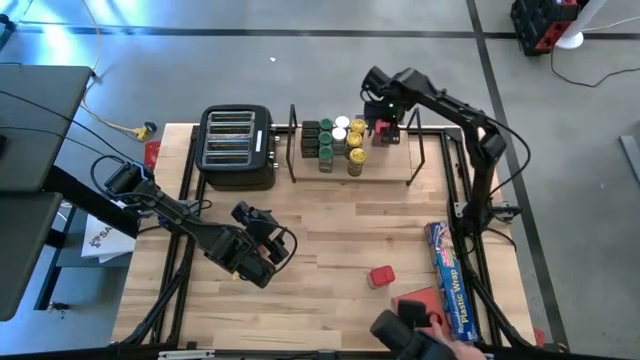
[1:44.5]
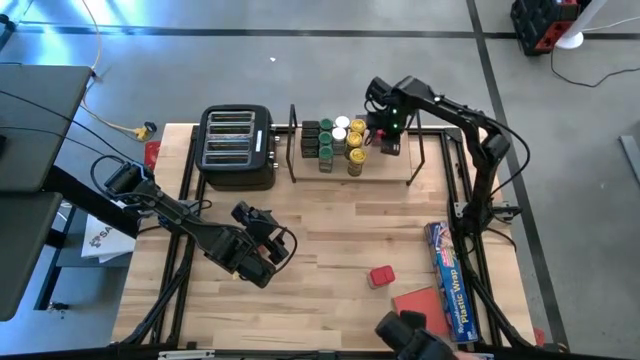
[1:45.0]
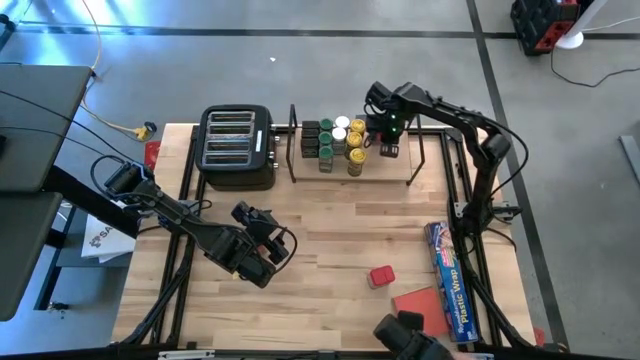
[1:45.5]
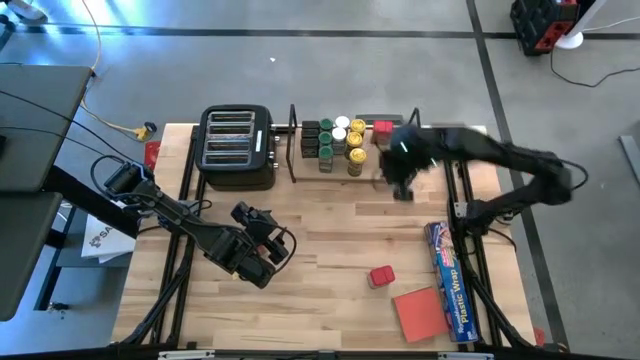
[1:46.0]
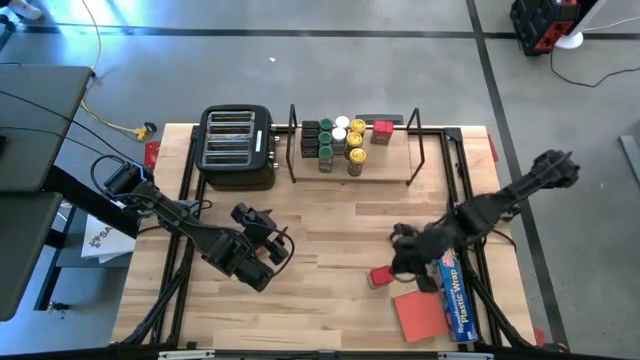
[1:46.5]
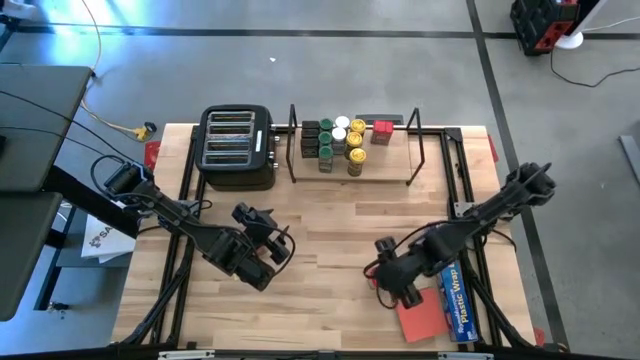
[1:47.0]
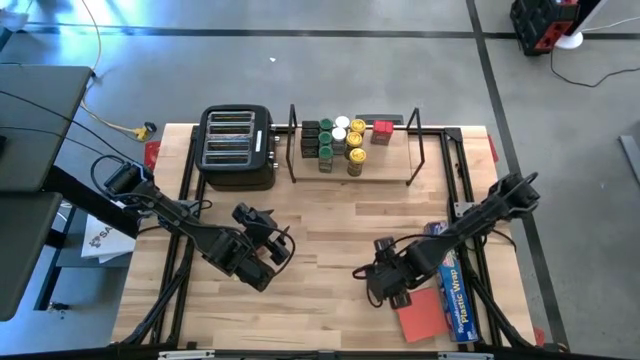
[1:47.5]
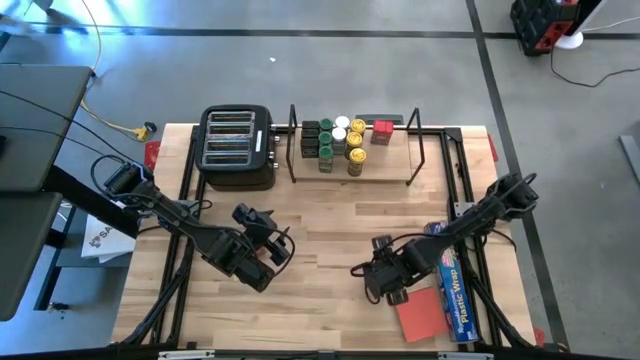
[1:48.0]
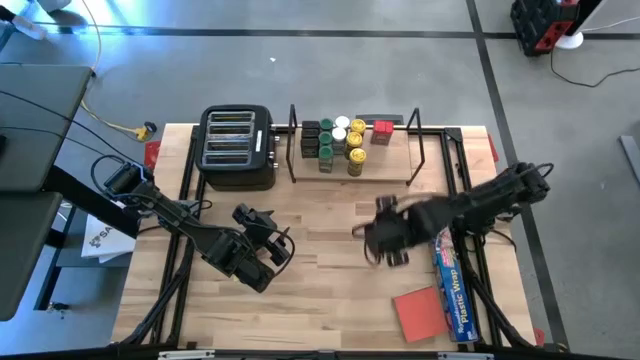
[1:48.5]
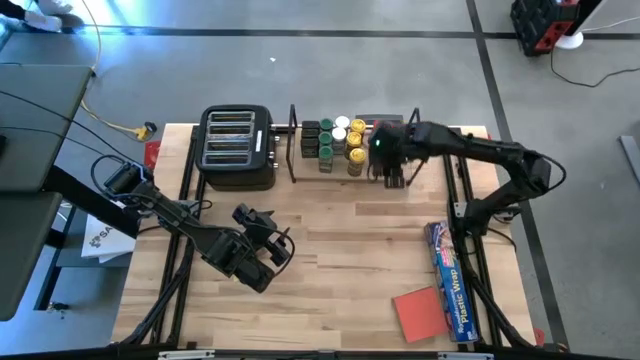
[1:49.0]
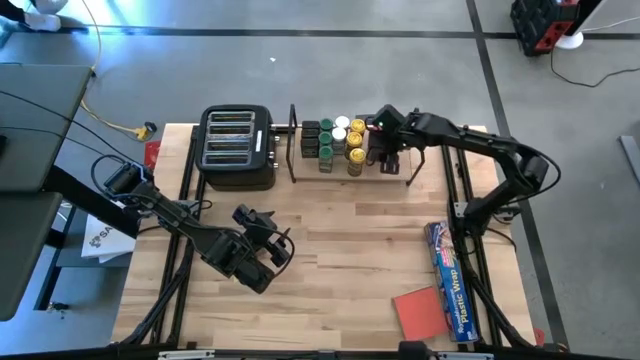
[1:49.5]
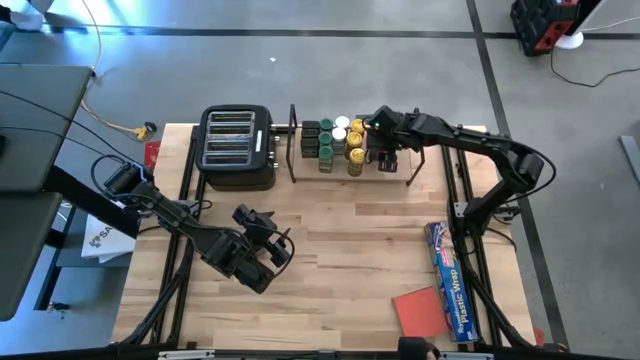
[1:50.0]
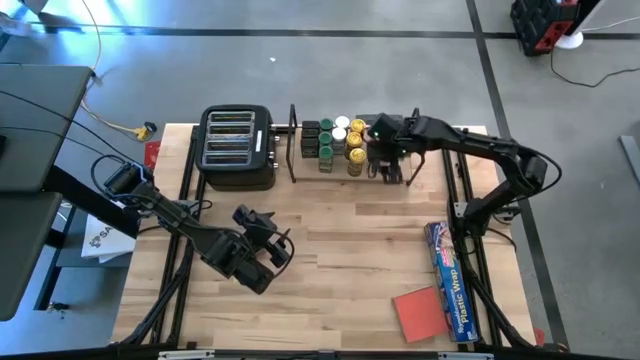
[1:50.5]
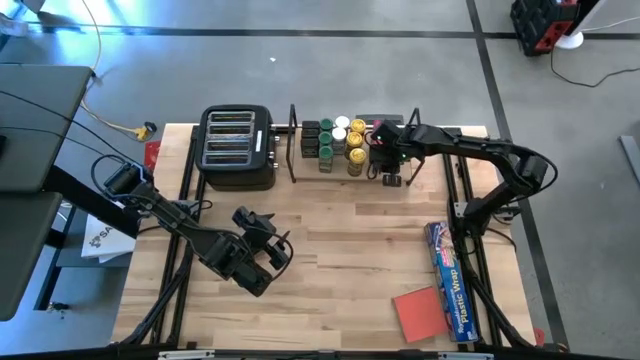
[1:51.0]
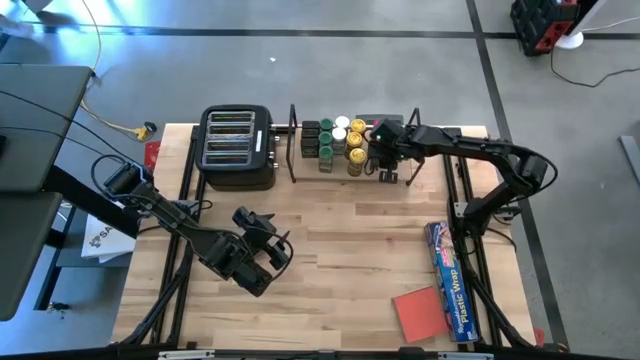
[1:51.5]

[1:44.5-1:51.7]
Task: Shelf spices
Put the right red seasoning can on the shelf aligned with the other red seasoning can

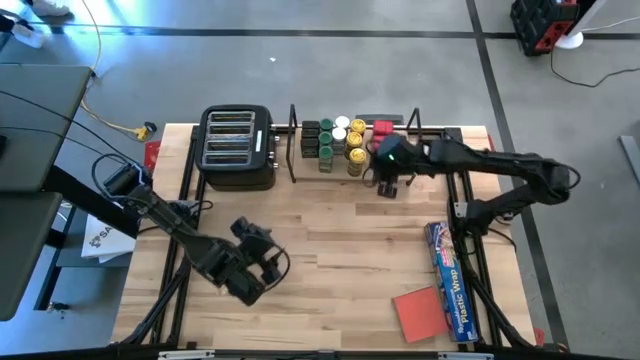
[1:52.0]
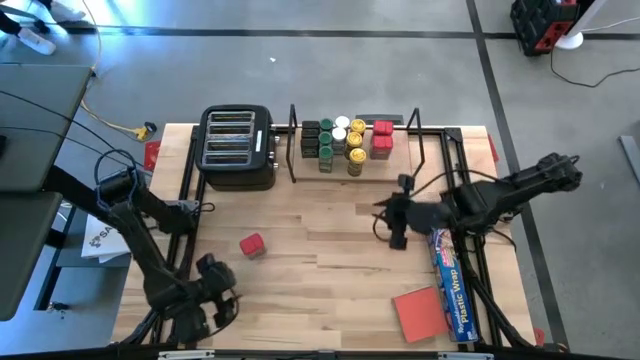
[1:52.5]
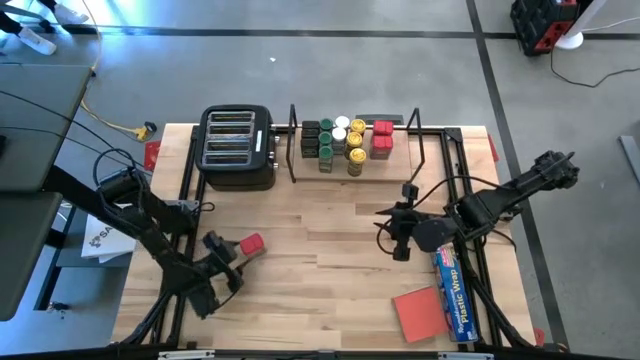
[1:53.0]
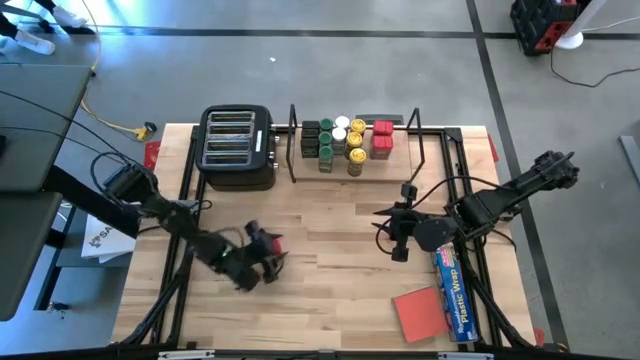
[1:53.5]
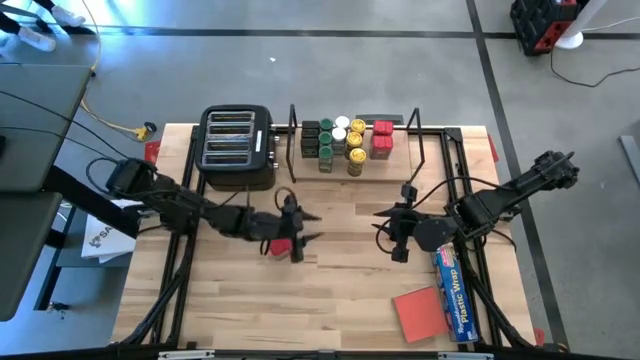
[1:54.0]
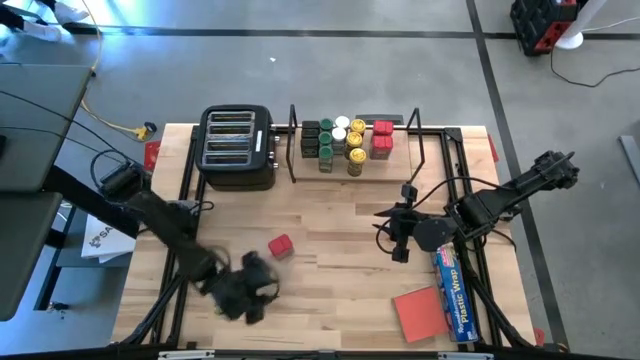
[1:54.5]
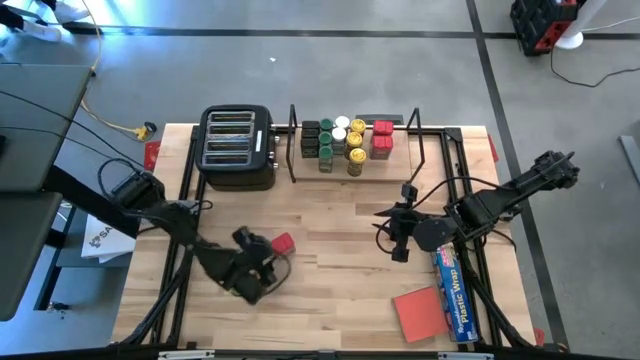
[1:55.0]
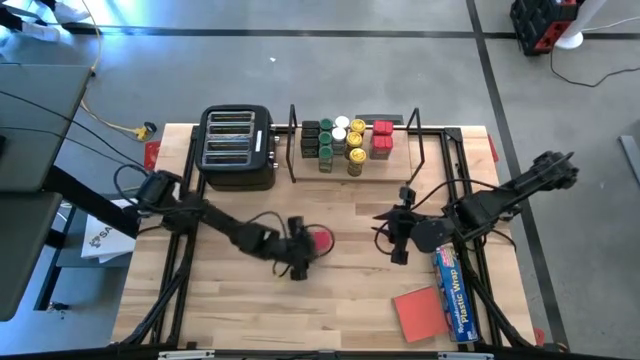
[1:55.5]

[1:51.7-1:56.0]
Put the red seasoning can on the shelf aligned with the other red seasoning cans

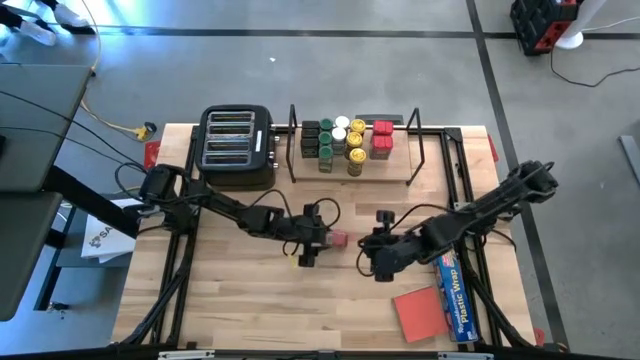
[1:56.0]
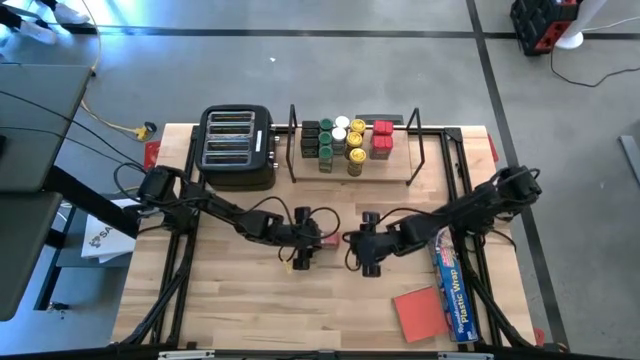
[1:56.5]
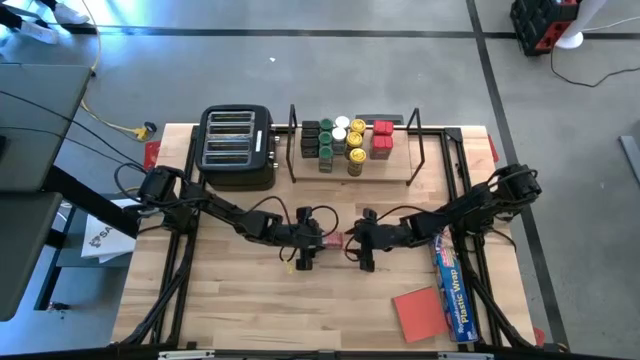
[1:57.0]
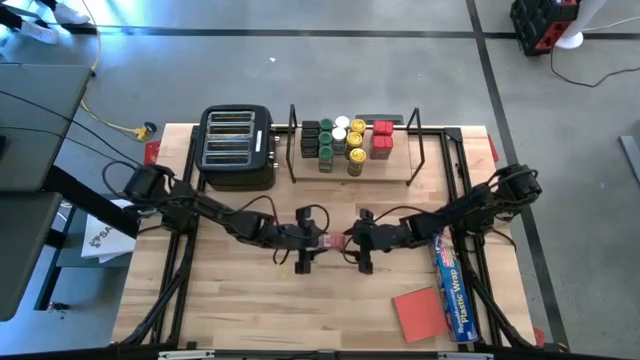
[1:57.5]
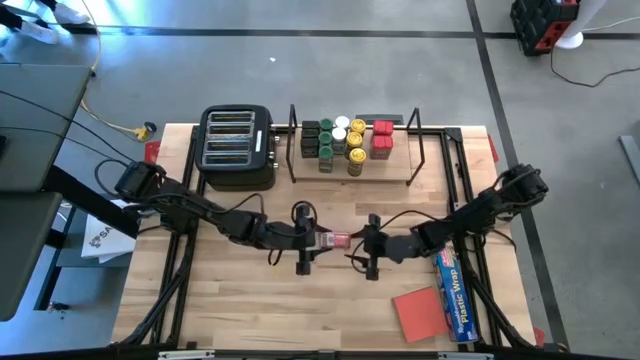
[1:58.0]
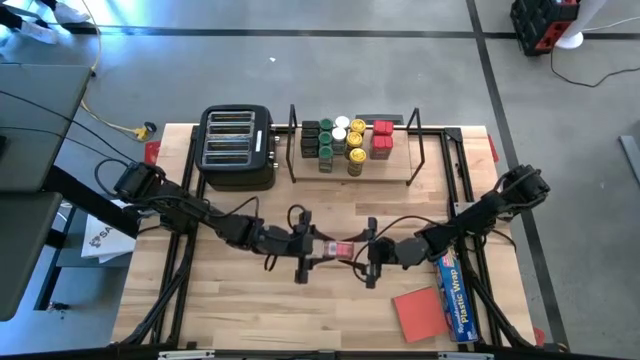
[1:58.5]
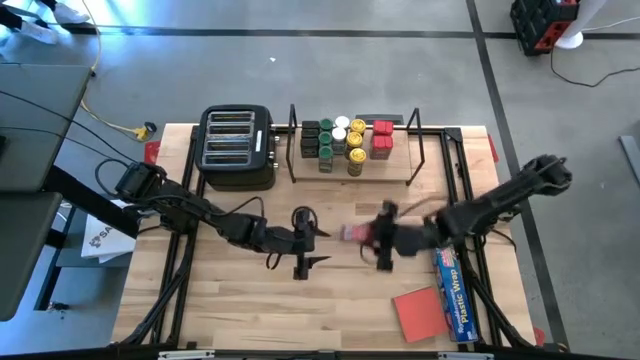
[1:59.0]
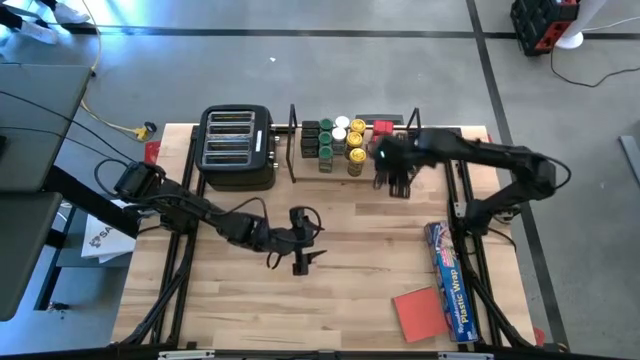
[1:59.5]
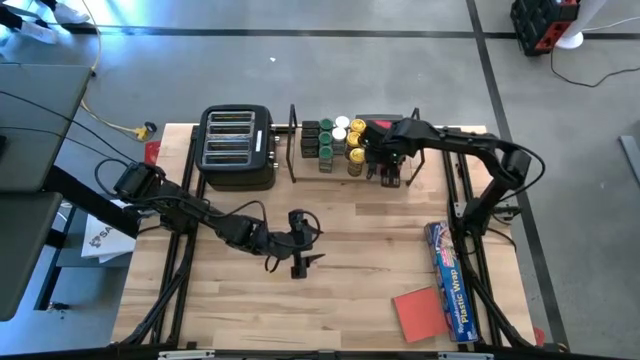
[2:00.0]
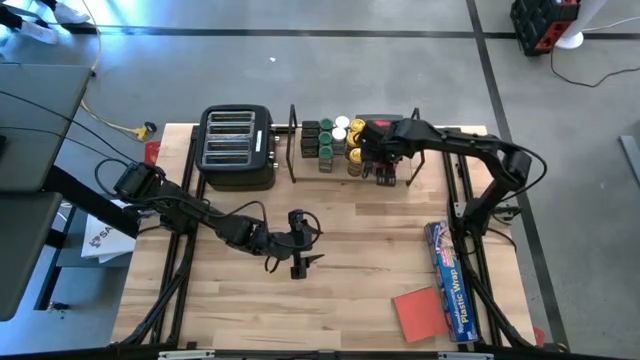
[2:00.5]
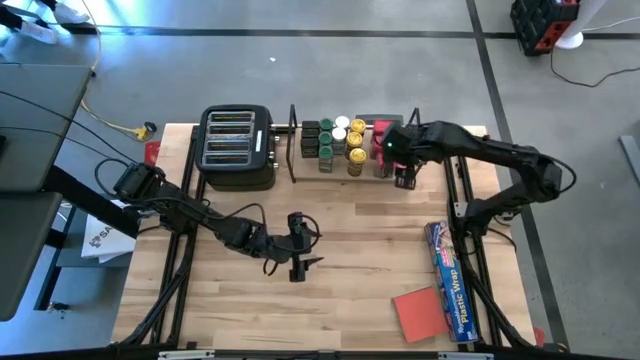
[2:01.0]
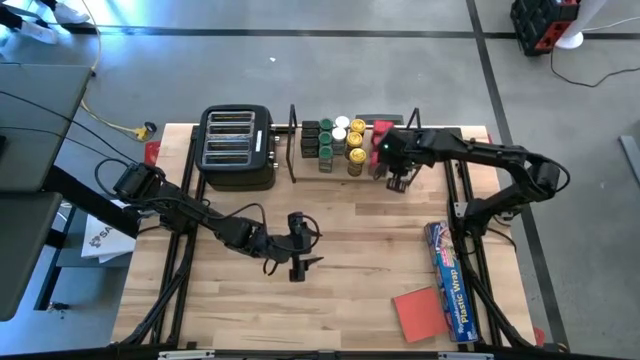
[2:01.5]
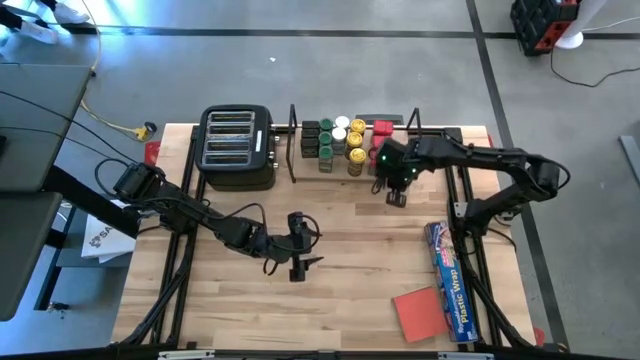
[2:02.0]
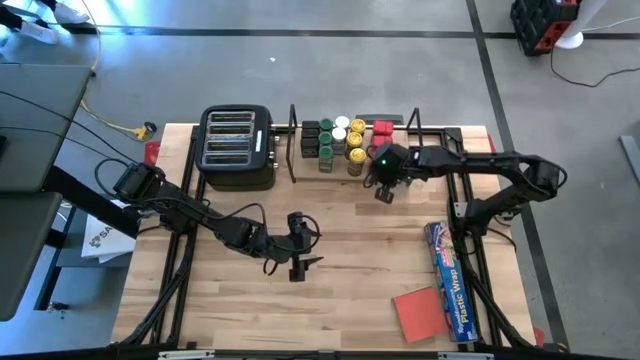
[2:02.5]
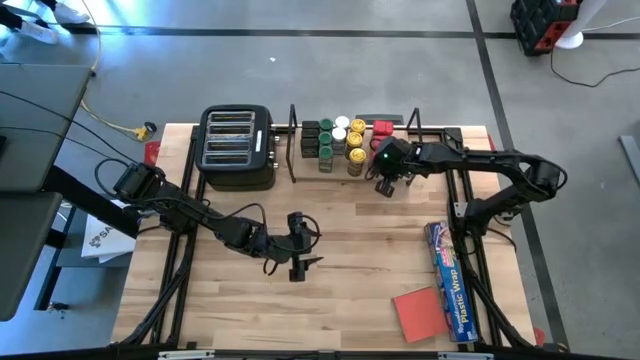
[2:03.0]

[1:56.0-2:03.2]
Put the red seasoning can on the shelf aligned with the other red seasoning cans

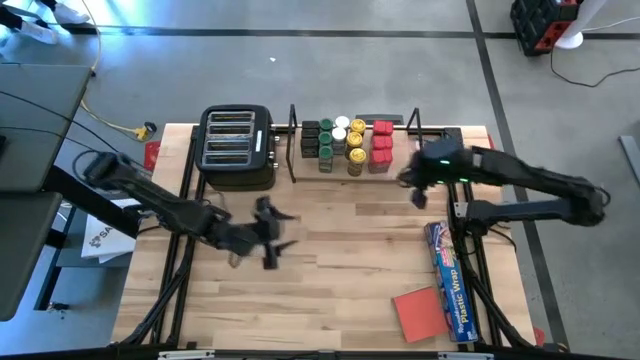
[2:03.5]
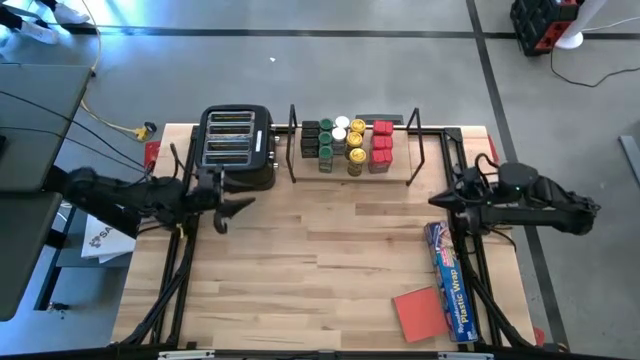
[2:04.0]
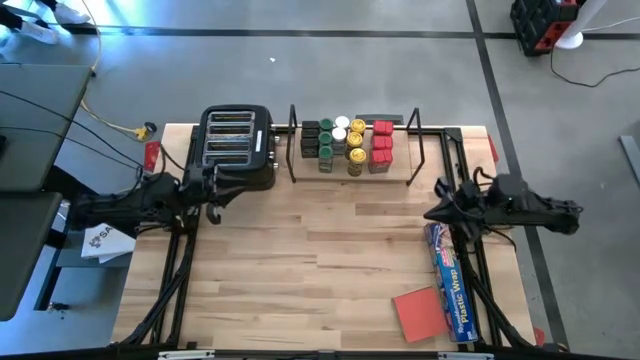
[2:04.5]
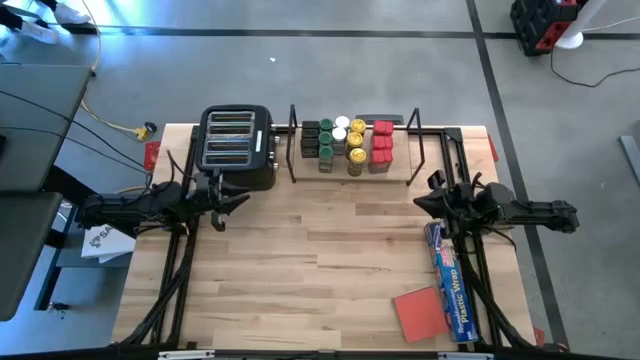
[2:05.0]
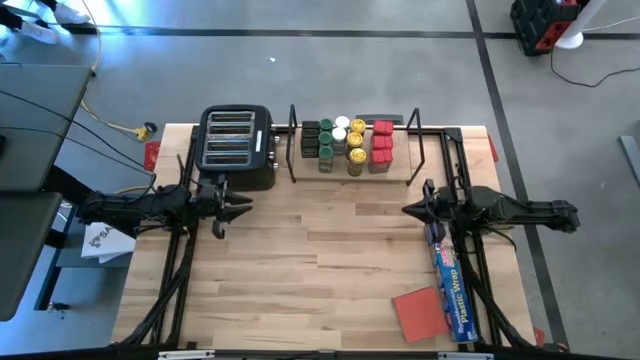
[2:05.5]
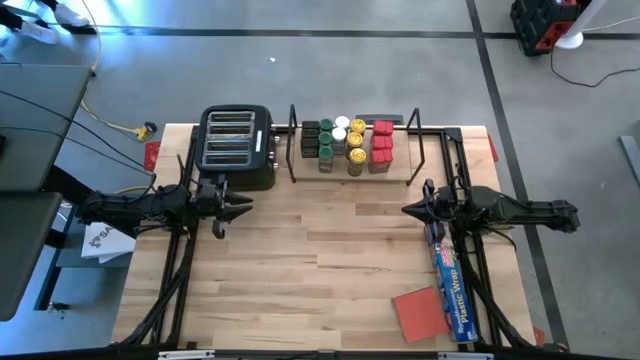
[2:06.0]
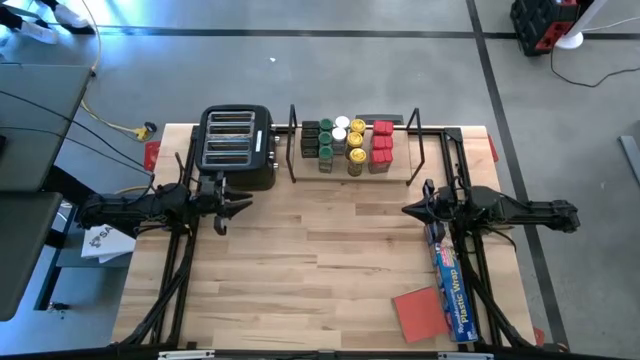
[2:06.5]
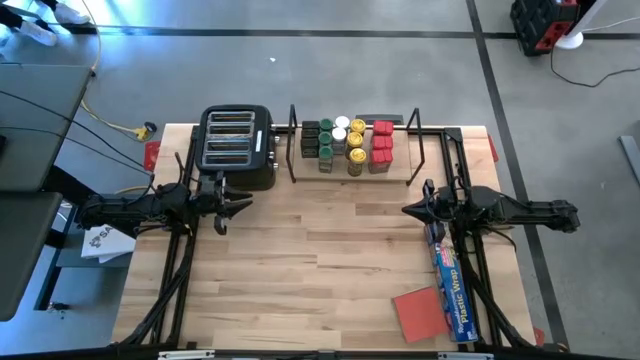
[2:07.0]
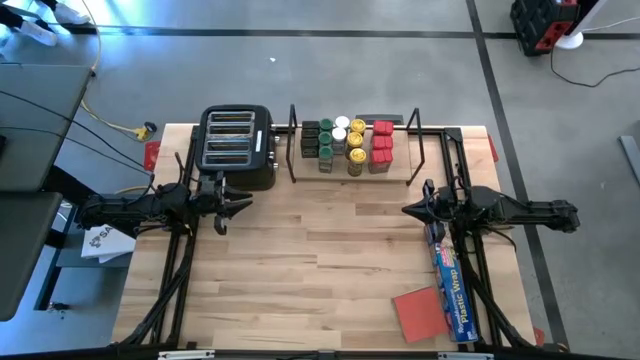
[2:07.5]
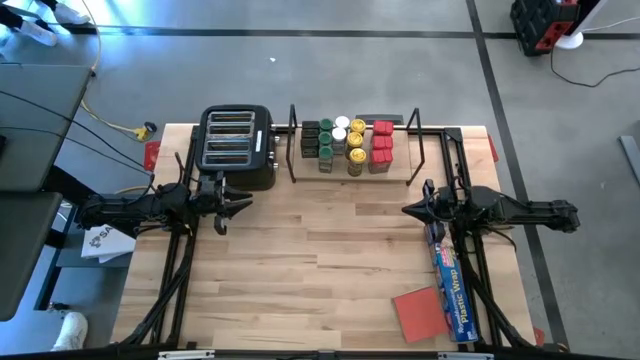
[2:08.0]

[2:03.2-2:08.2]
Return to Home Position
